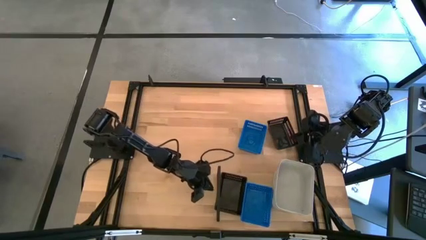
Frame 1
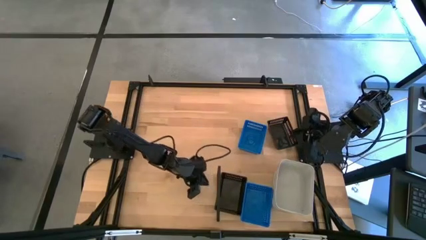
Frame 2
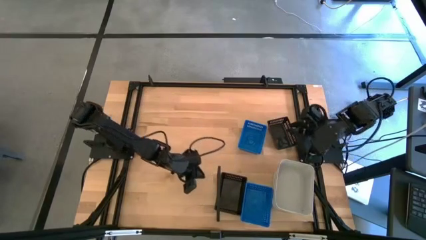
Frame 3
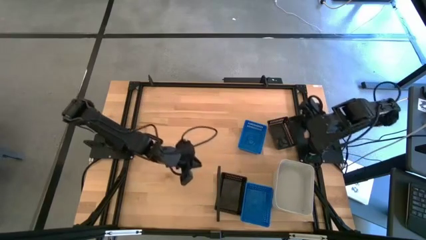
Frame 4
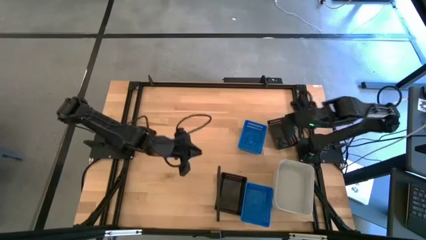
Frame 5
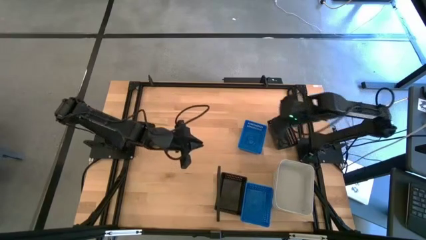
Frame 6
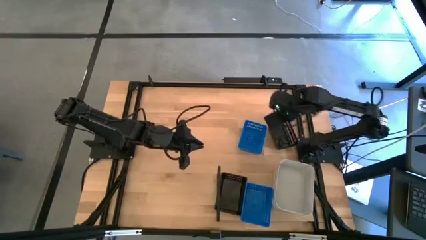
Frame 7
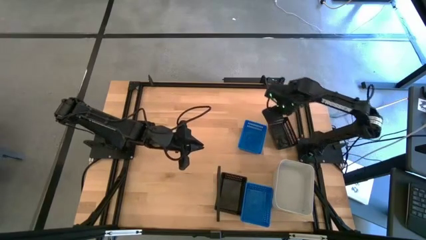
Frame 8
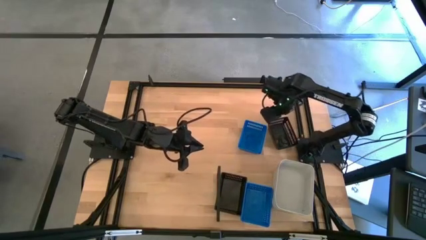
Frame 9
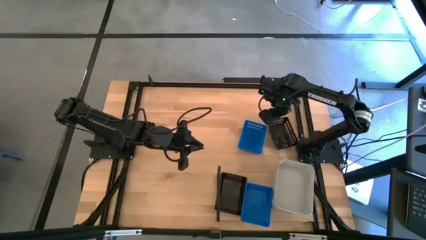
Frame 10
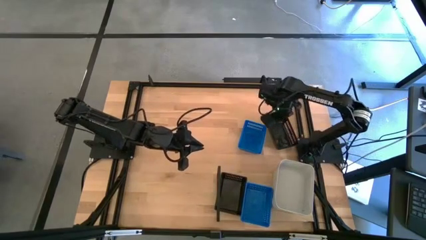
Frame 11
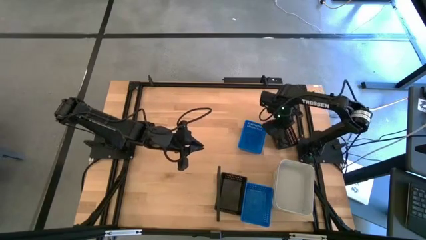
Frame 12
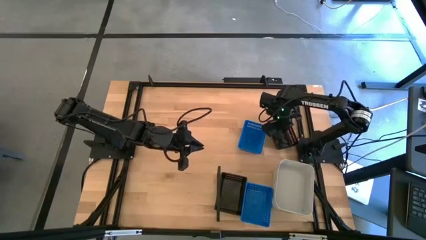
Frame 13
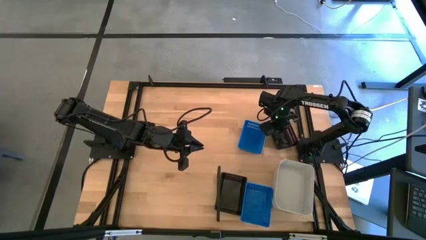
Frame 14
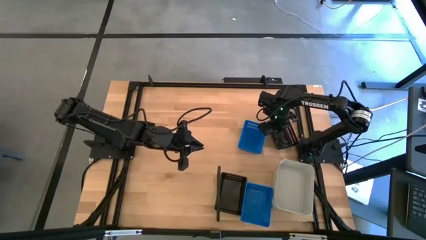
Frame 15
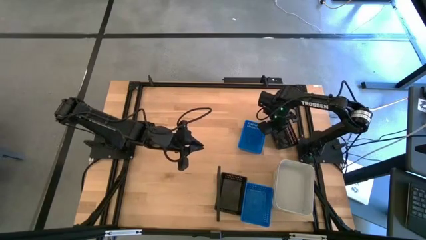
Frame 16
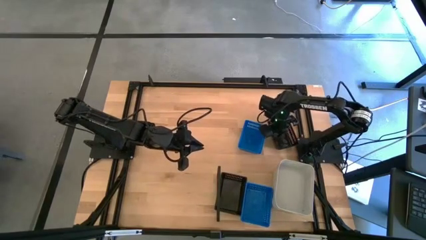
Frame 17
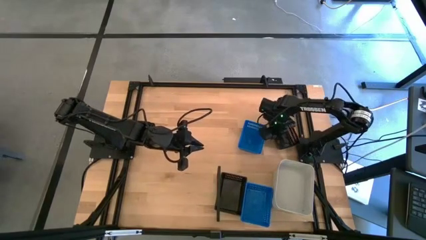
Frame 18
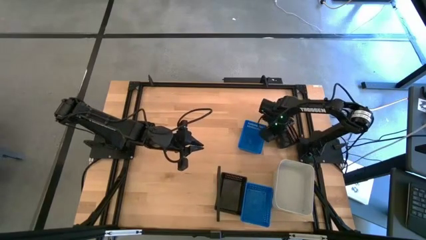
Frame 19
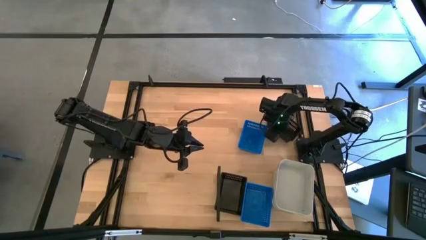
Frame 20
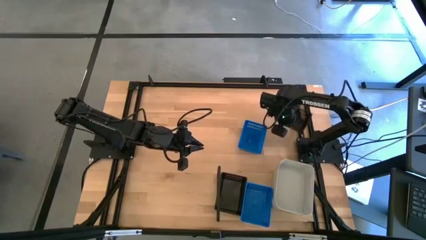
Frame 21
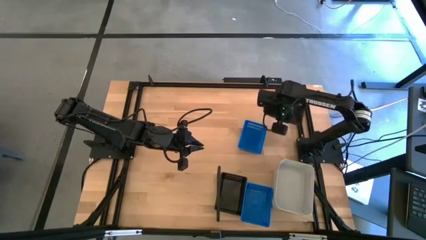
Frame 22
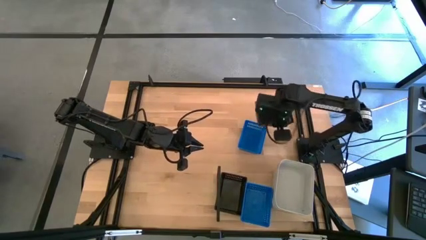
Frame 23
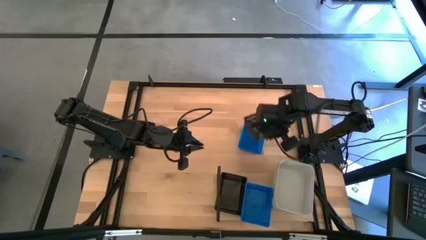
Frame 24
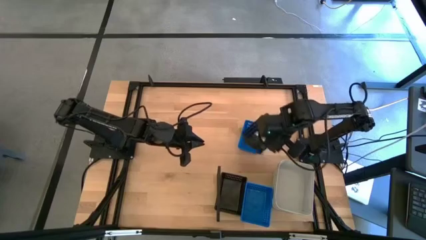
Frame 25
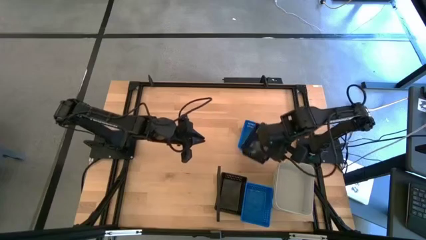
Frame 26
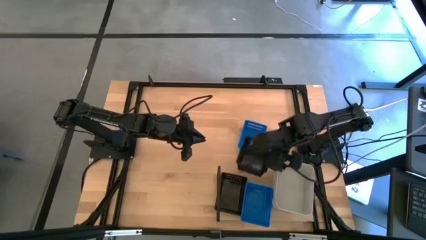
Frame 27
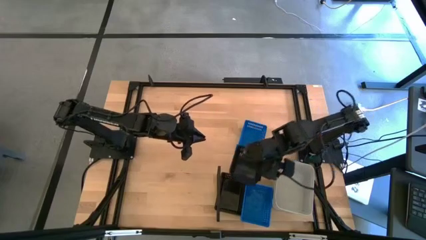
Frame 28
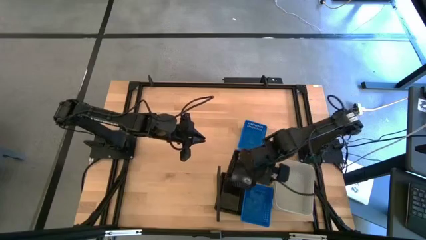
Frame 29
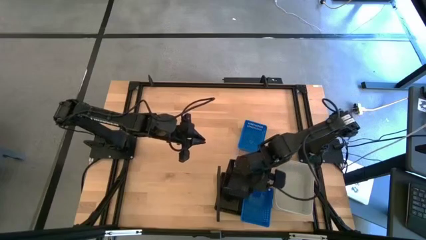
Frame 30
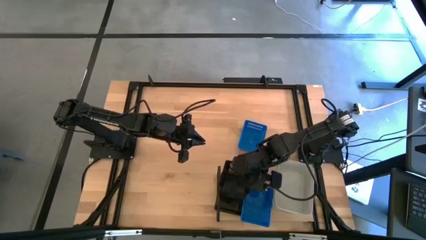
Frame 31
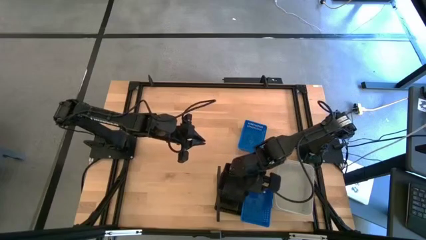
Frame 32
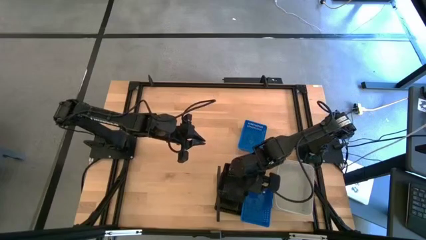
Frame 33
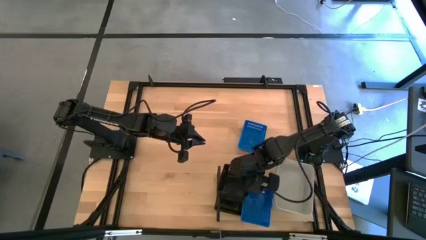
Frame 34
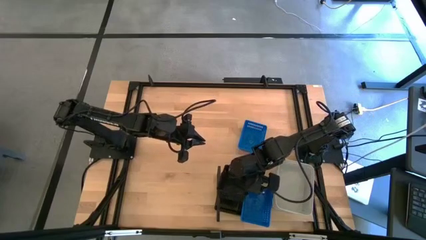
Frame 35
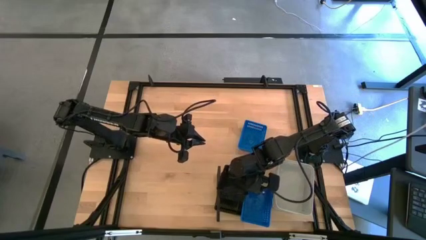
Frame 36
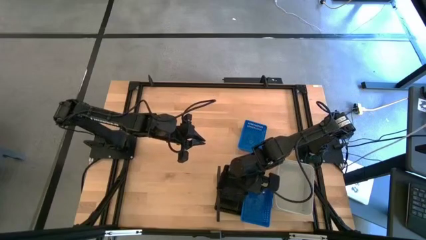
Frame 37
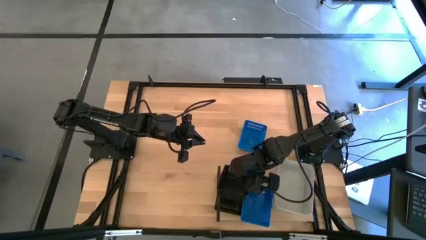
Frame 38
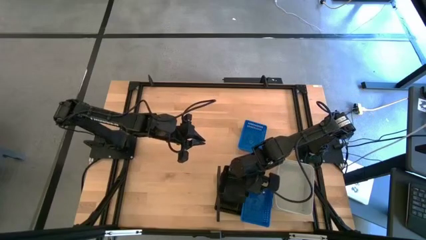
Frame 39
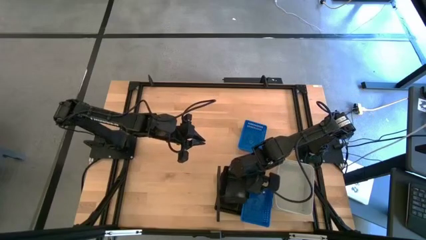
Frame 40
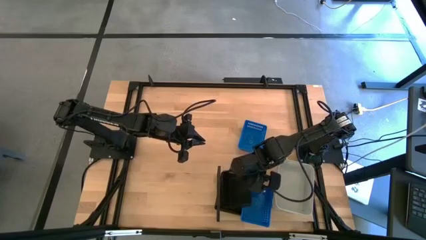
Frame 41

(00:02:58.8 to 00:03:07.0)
Task: Stack baskets on shelf by color
Stack the black bin on top of the black bins on the shelf

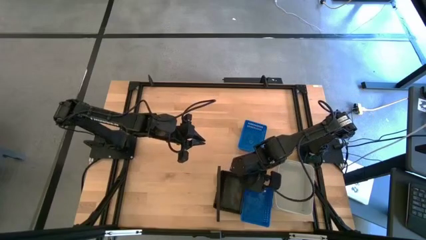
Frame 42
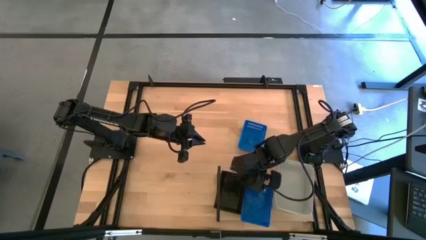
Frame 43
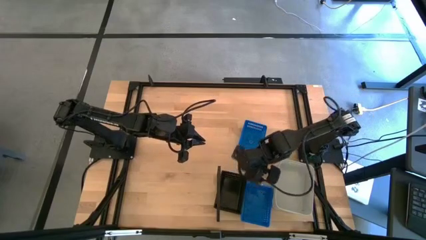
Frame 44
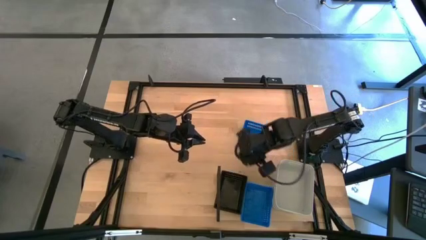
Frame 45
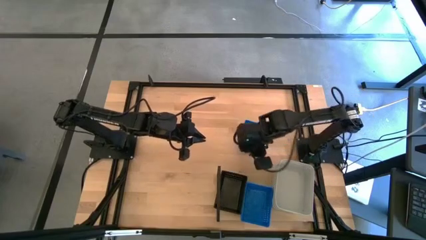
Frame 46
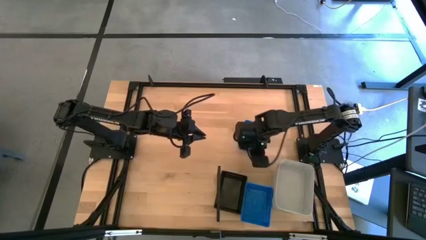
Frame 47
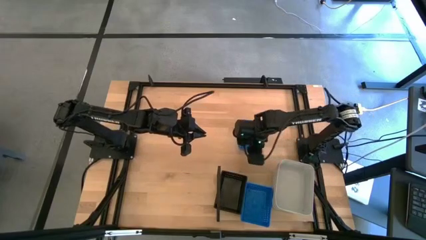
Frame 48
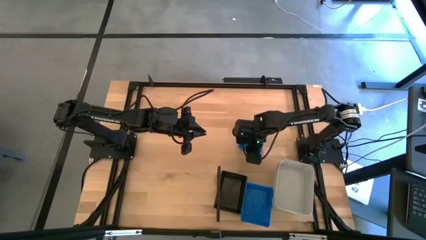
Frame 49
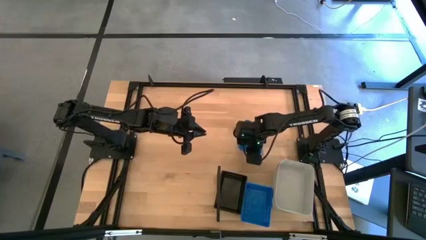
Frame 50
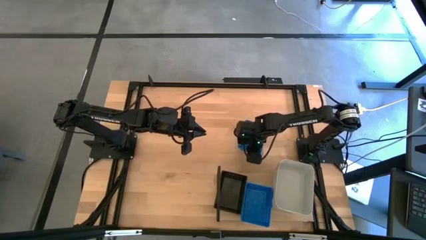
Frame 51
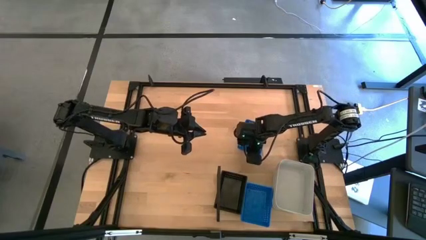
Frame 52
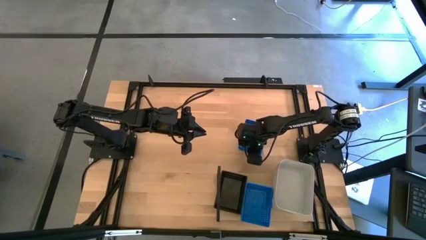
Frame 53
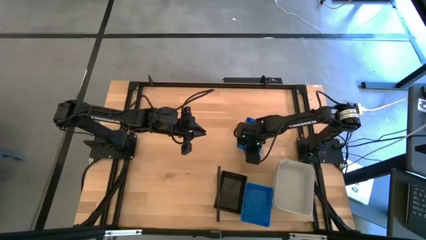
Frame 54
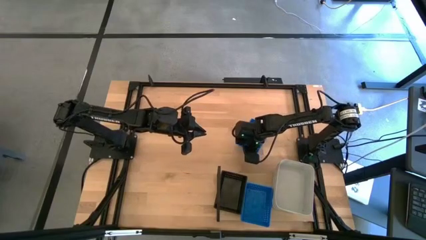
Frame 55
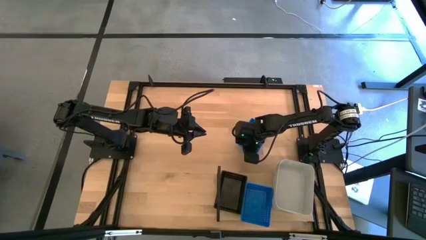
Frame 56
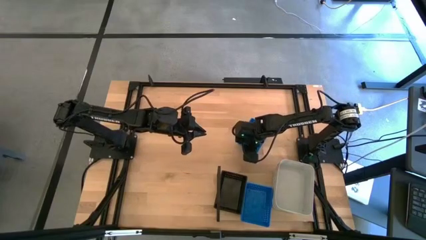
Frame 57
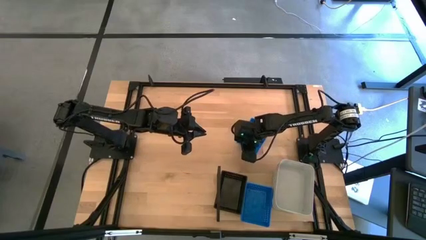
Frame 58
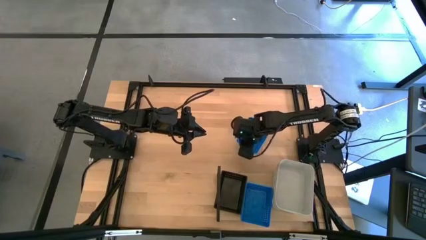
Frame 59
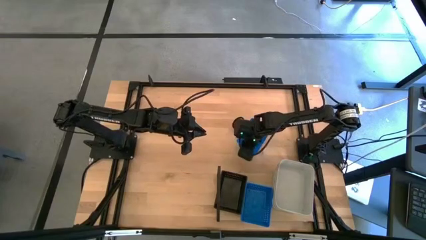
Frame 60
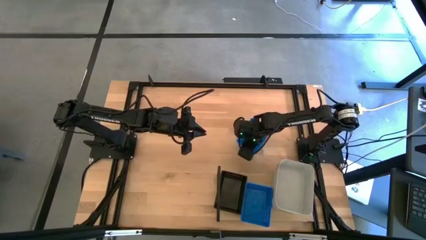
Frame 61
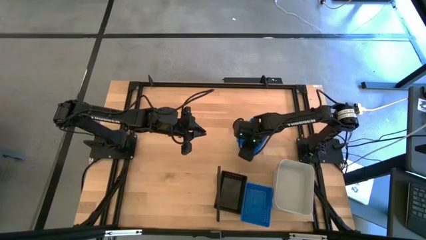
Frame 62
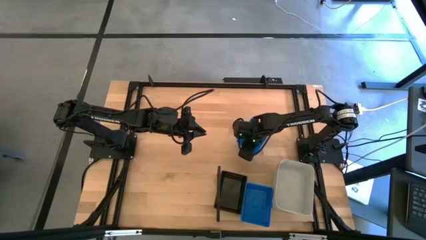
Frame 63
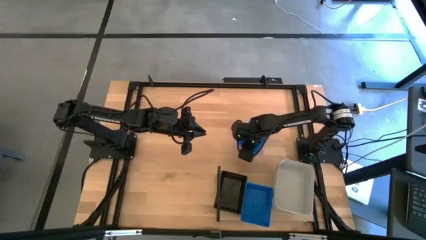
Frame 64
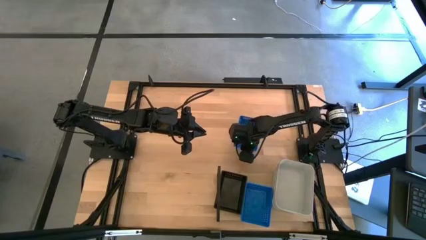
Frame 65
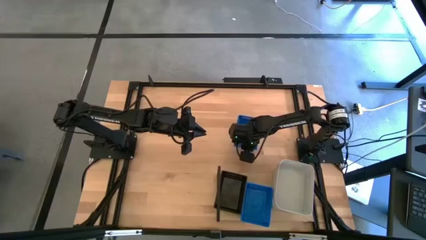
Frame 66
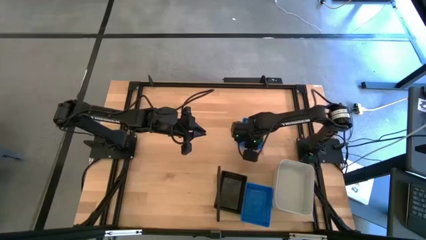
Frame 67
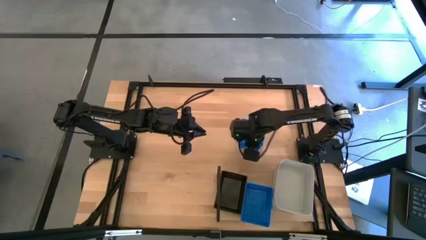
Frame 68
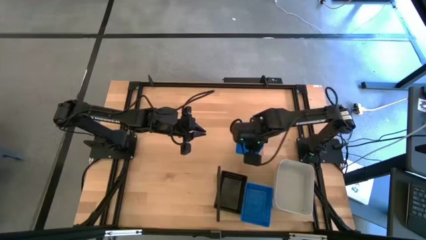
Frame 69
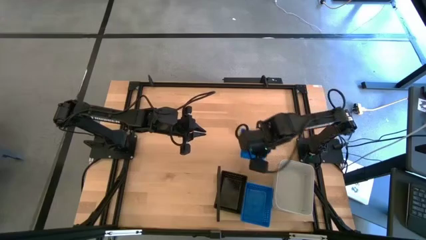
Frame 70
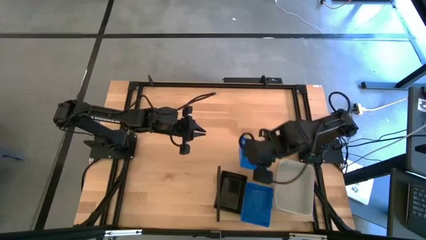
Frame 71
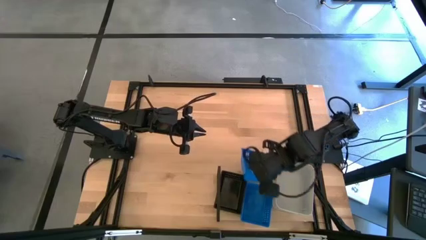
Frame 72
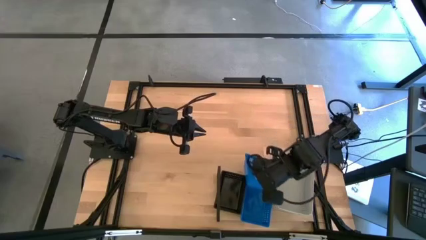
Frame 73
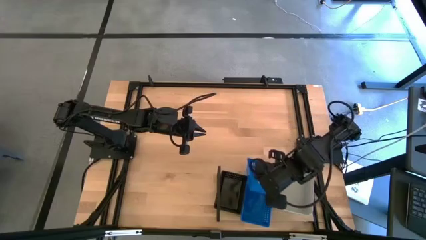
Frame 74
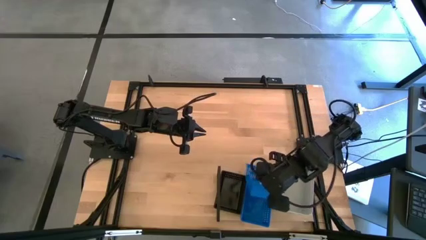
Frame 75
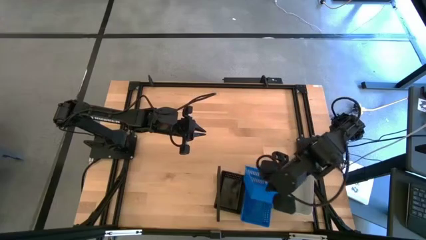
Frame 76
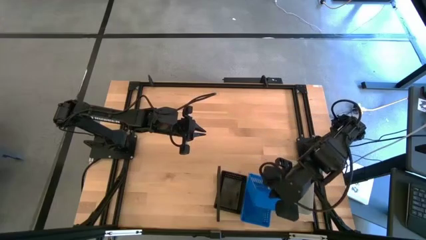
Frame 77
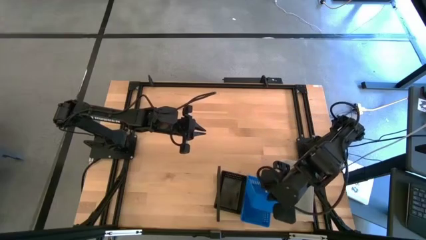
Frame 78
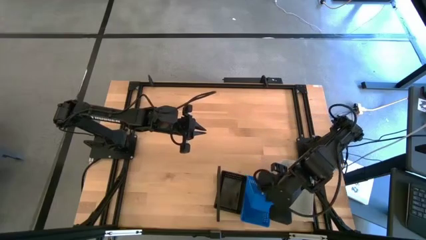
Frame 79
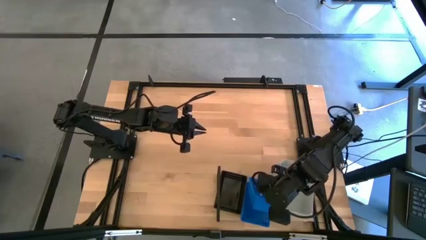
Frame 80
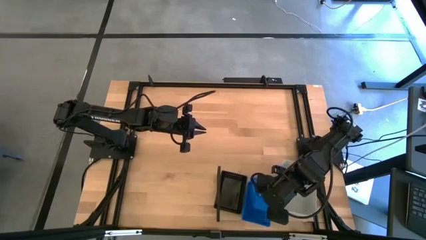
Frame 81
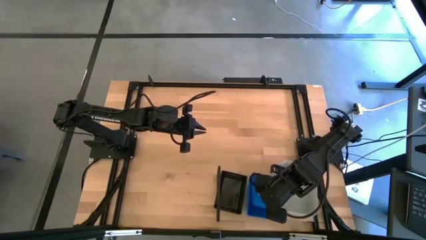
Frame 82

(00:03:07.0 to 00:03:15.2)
Stack the blue bin on top of the blue bins on the shelf
